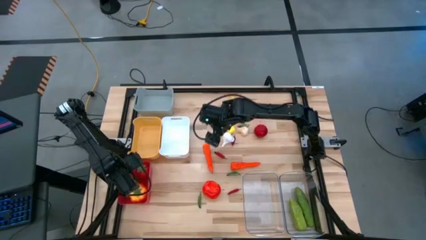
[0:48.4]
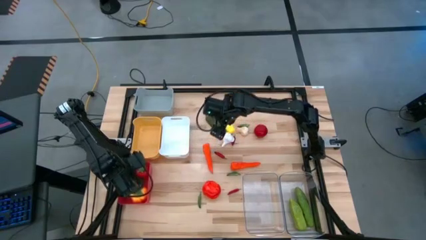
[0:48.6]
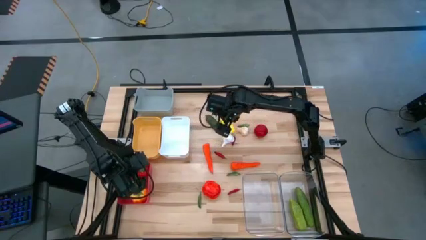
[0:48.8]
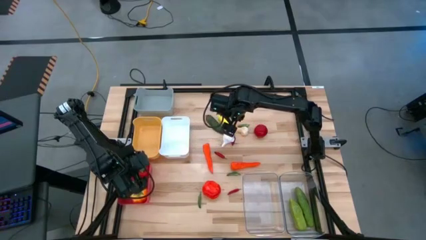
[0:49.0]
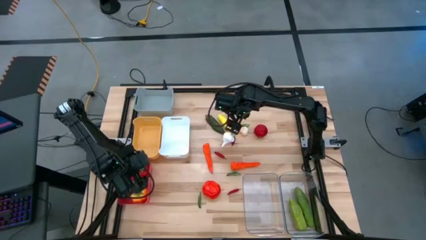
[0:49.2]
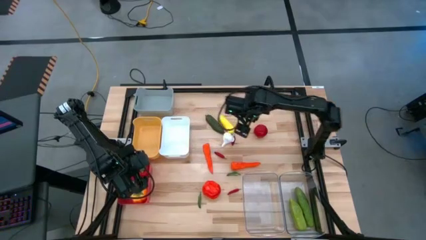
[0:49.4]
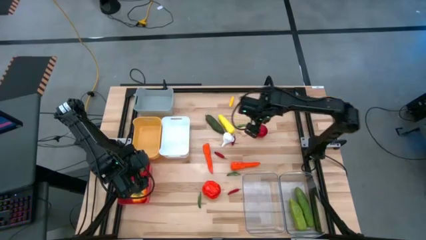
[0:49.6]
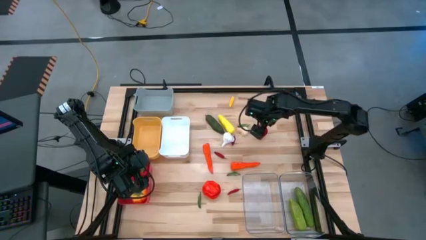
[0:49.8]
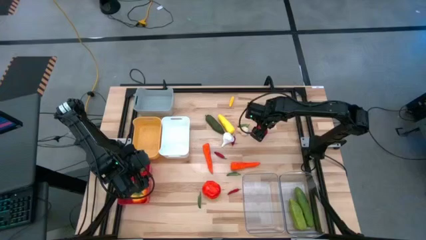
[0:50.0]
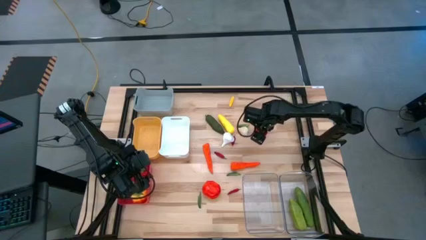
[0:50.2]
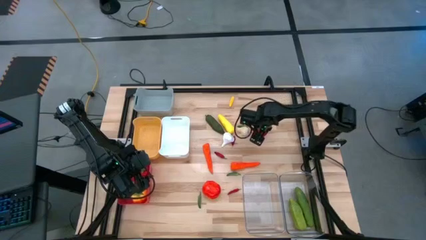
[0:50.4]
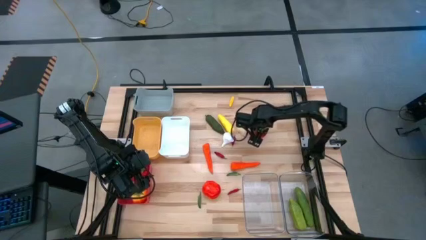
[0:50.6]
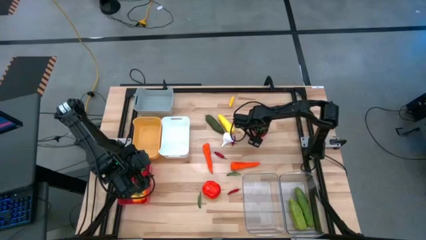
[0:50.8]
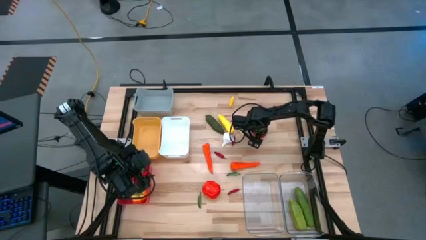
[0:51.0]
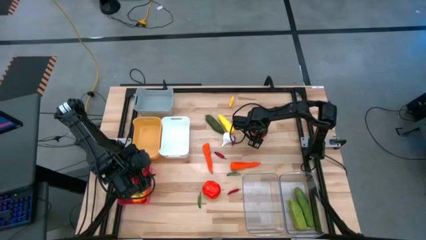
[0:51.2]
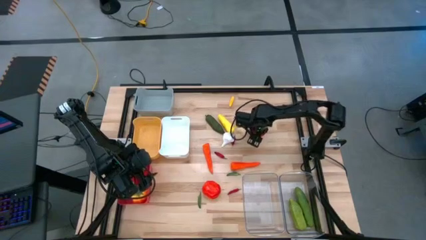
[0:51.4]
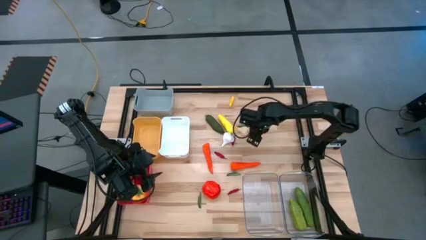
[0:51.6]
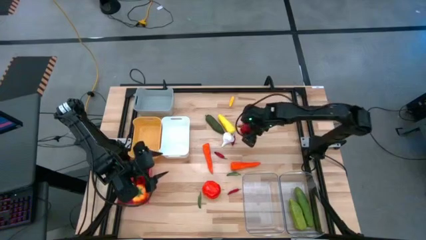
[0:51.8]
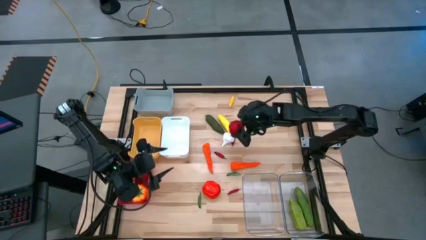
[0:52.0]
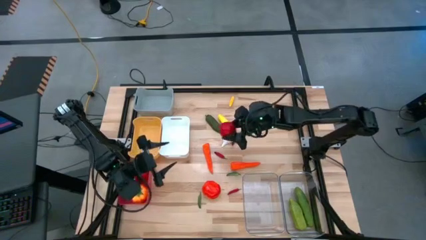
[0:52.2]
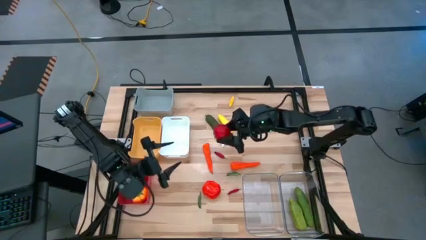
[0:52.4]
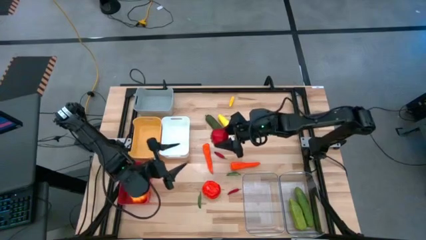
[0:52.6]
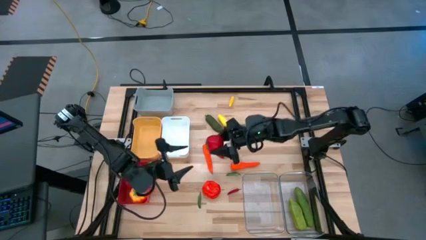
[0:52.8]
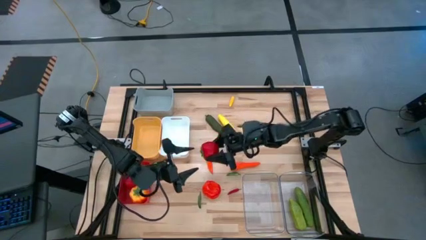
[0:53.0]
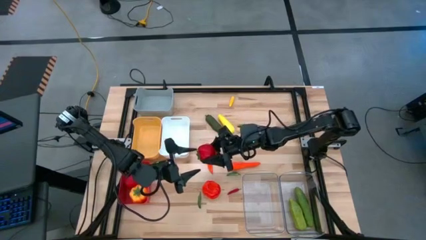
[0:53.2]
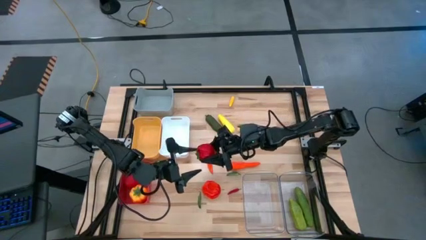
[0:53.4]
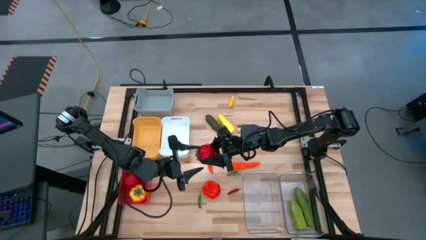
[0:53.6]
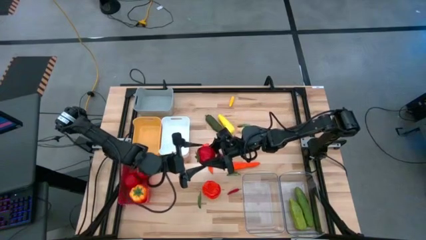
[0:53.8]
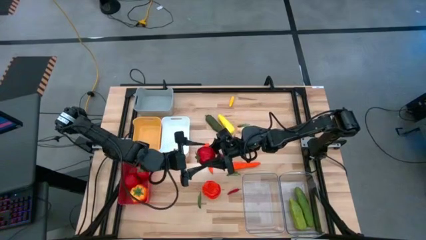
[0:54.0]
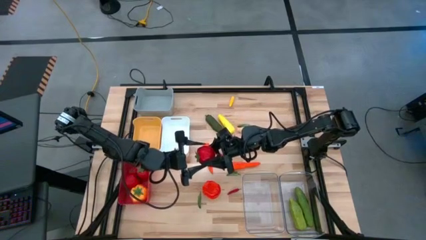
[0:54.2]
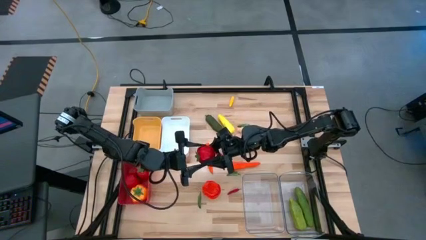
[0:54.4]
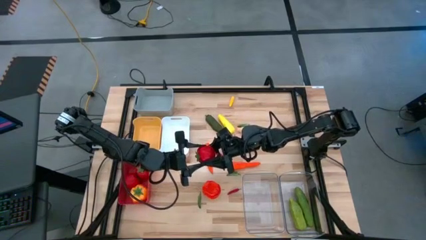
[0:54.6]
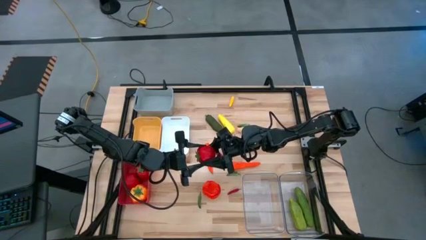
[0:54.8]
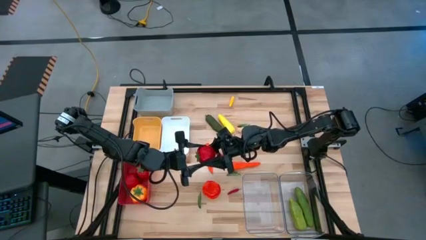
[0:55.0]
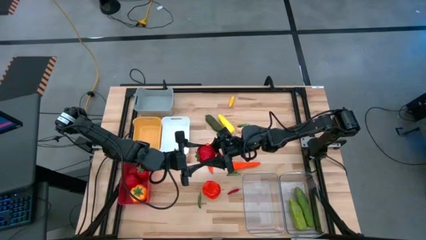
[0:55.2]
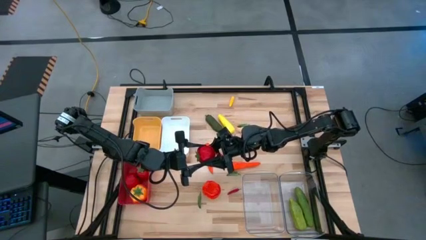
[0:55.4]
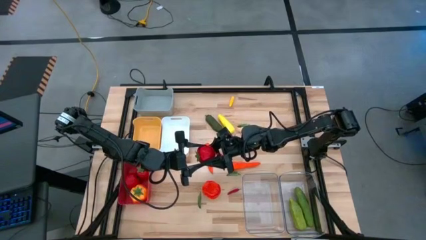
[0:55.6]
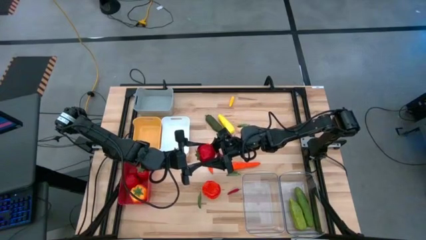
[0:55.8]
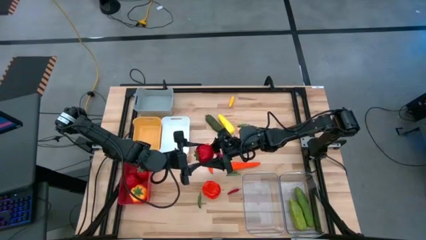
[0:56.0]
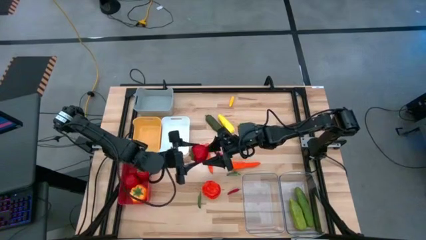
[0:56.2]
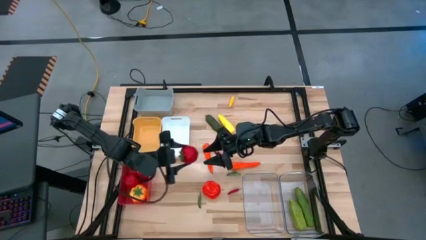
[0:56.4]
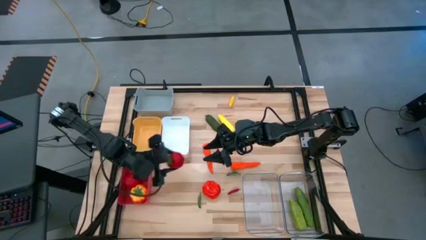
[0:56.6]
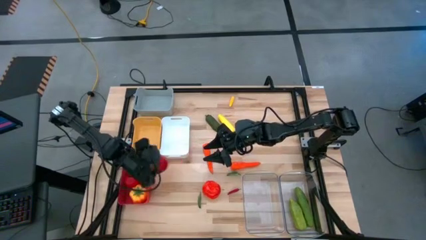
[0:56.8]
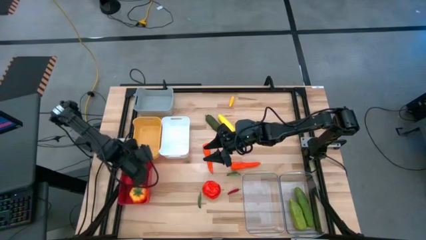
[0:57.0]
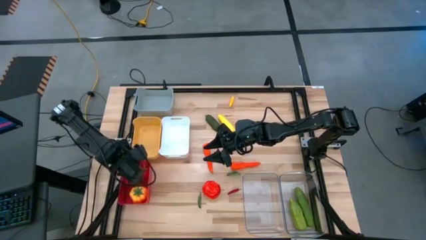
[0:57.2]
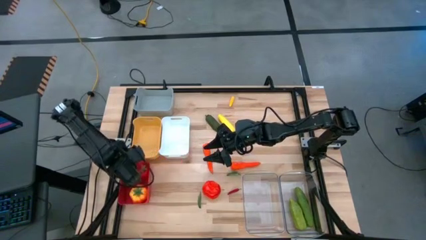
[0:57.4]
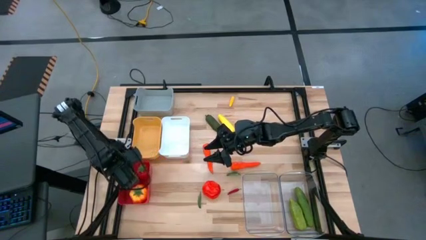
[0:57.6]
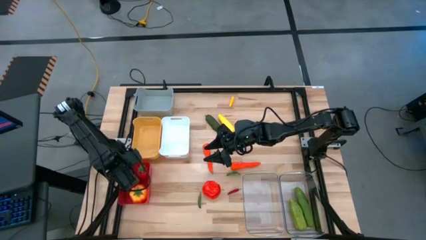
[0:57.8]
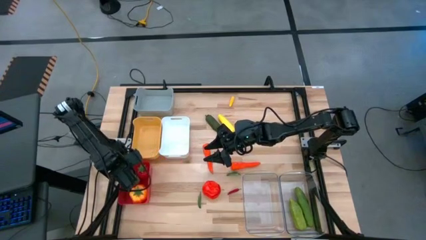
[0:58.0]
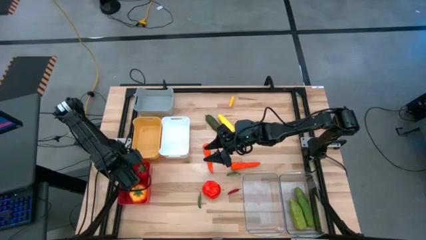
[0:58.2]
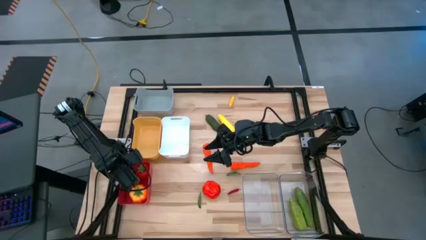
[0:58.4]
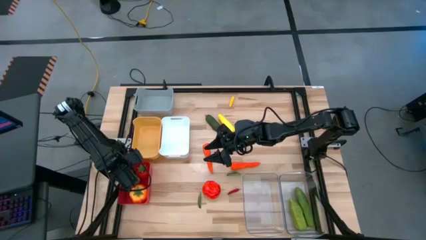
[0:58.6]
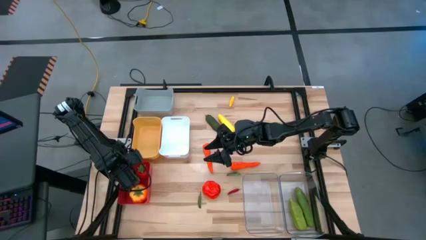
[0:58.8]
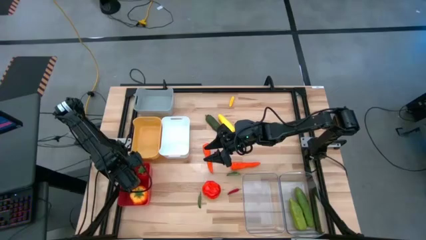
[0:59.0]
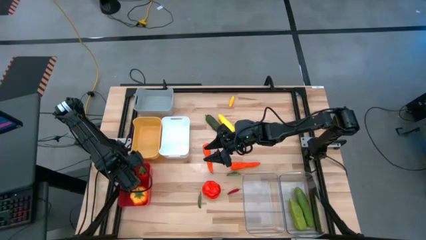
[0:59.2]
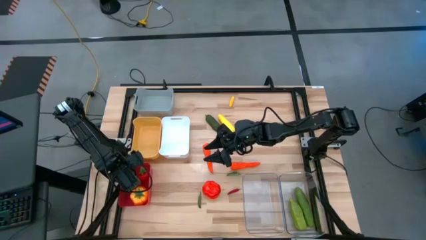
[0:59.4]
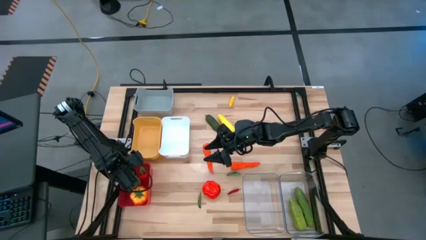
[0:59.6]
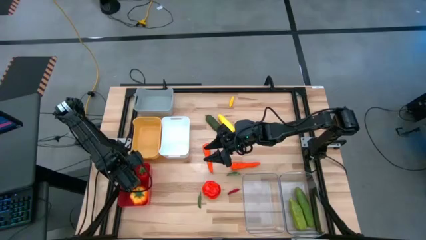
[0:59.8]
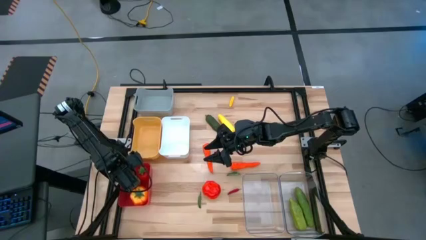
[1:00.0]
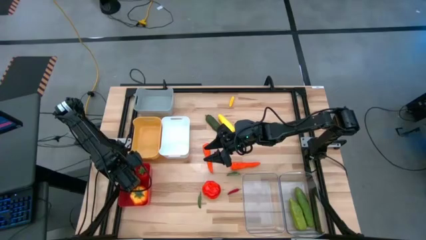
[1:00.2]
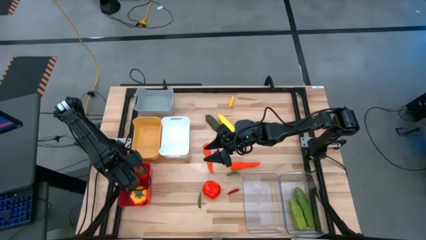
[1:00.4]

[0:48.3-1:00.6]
Task: Sort produce into baskets
Put the red tomato into the red bin

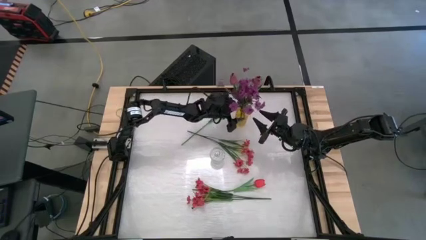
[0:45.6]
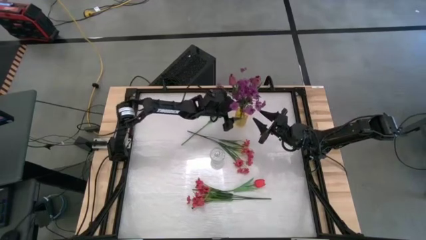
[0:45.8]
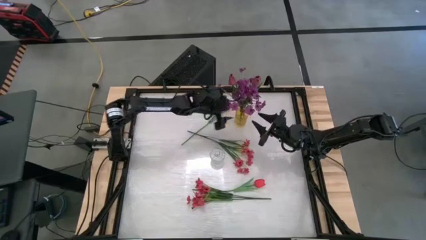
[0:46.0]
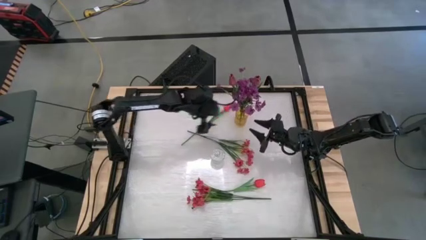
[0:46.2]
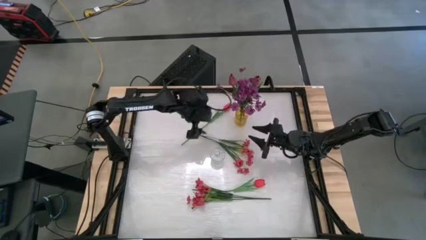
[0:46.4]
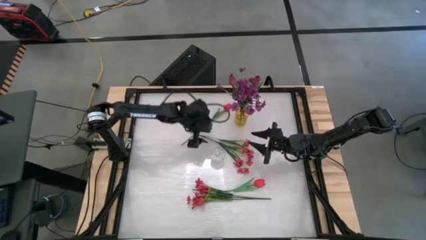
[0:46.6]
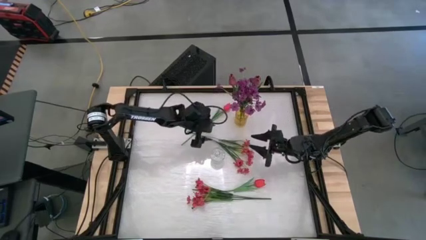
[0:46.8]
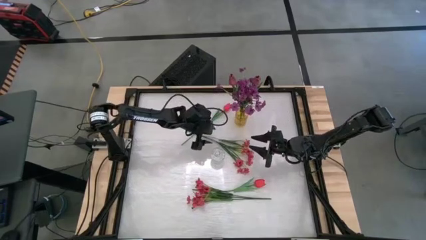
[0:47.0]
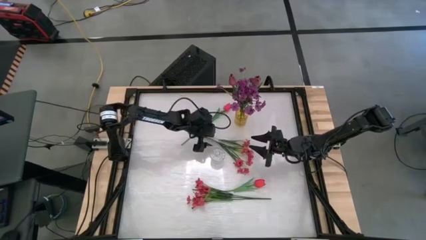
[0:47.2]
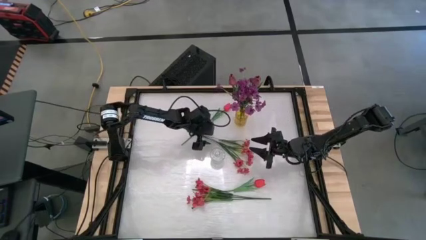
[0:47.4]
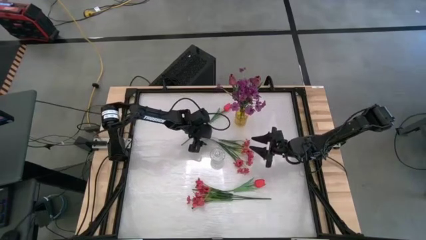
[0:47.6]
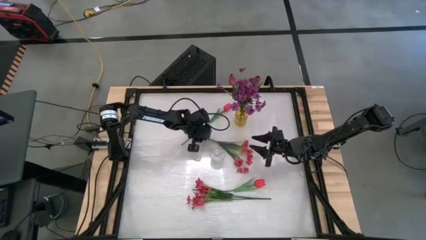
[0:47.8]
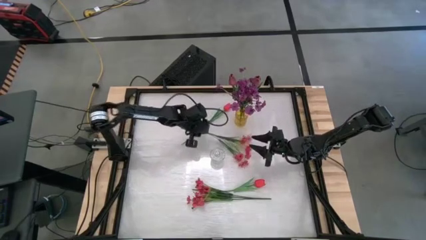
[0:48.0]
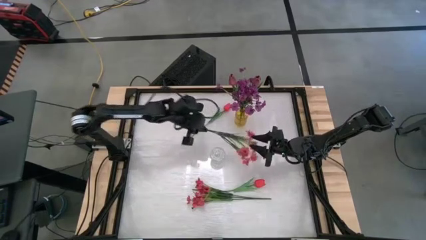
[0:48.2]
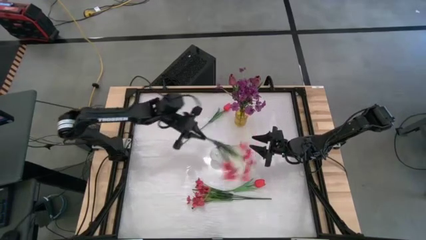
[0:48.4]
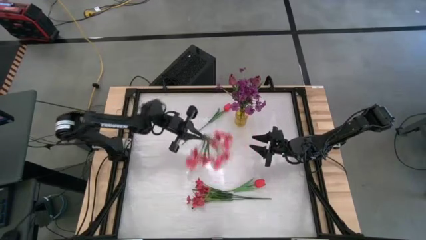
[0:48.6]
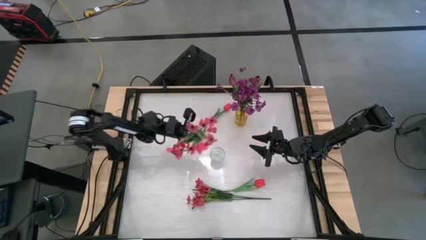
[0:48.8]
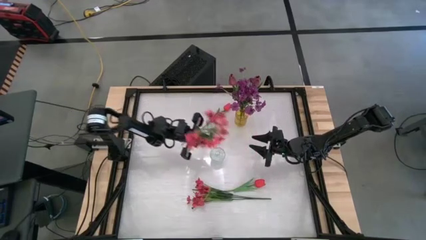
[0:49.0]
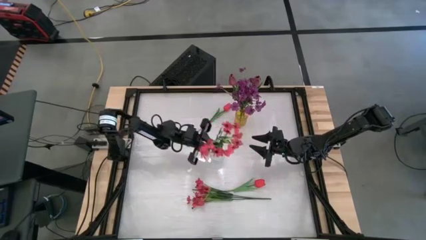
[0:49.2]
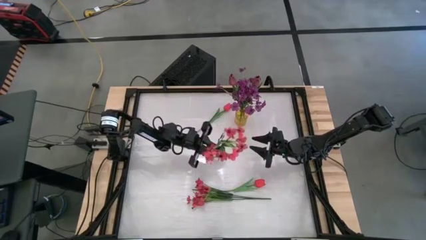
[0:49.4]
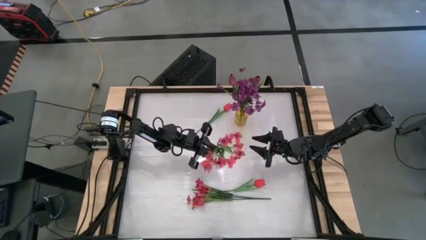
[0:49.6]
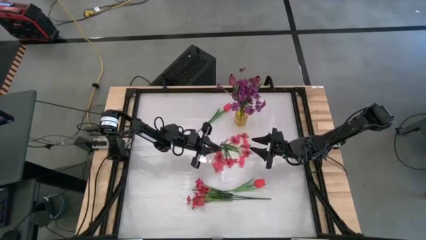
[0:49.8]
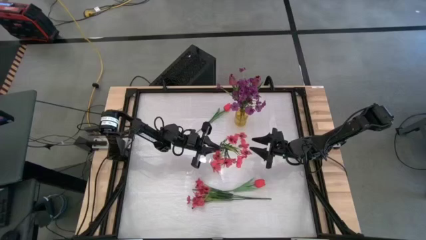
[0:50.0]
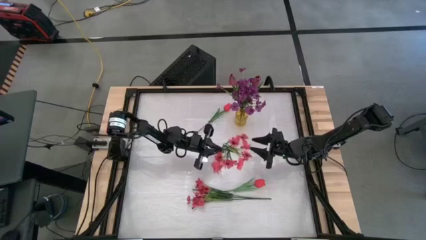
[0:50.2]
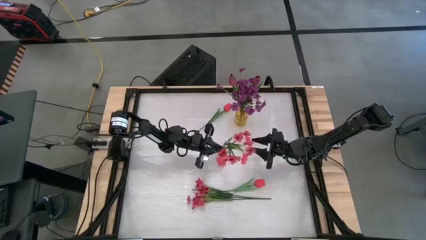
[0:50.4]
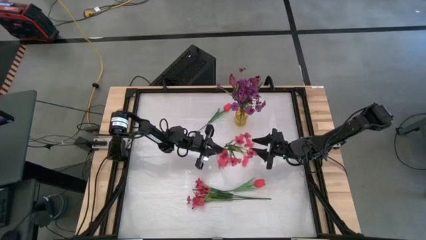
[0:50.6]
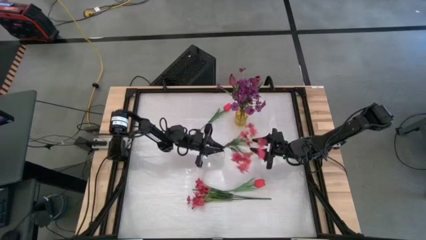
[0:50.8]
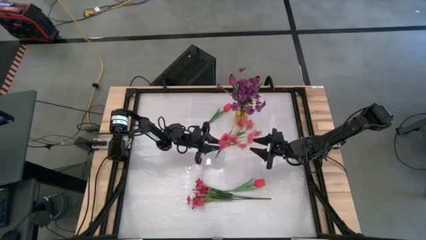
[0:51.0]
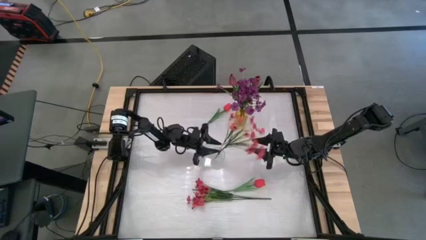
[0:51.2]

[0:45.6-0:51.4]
Task: Sort flowers into vase by color
Put the bottom pink flower into the transparent vase
